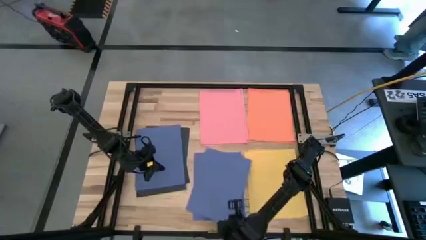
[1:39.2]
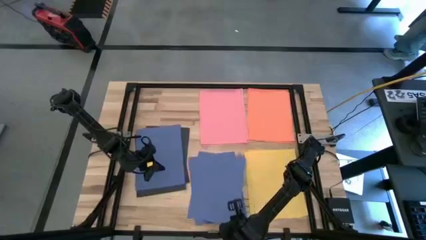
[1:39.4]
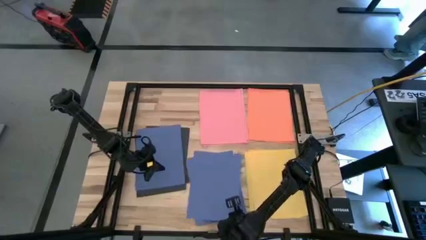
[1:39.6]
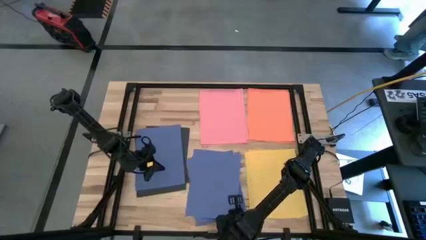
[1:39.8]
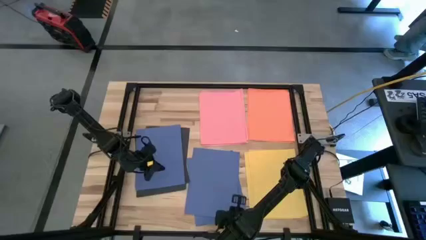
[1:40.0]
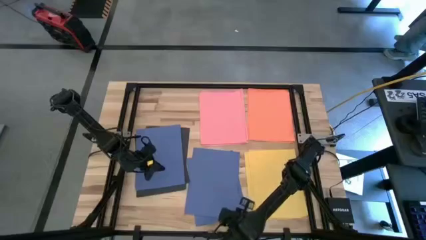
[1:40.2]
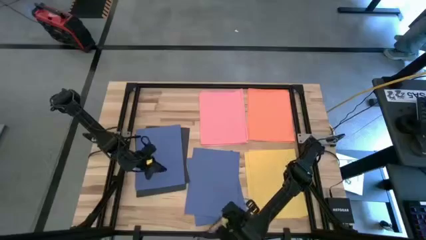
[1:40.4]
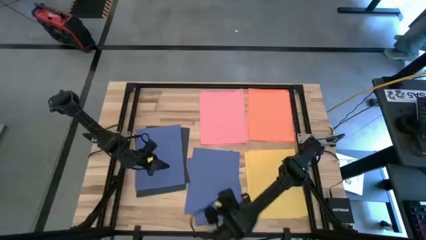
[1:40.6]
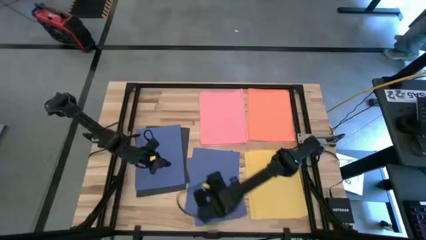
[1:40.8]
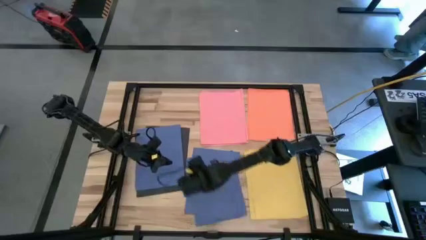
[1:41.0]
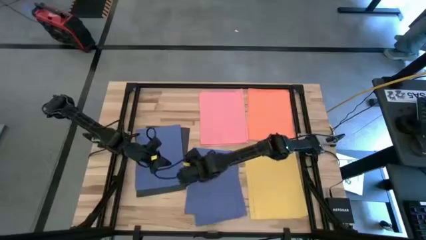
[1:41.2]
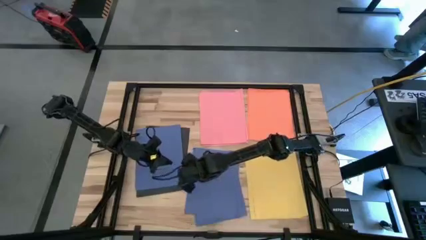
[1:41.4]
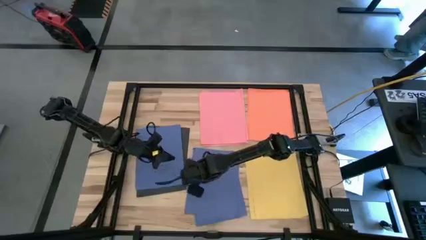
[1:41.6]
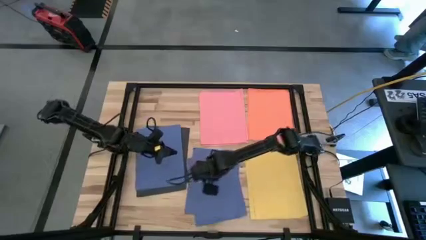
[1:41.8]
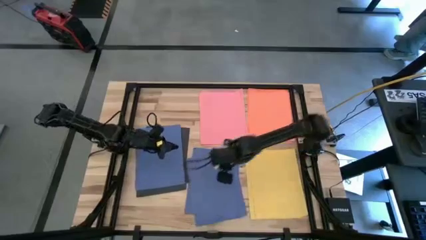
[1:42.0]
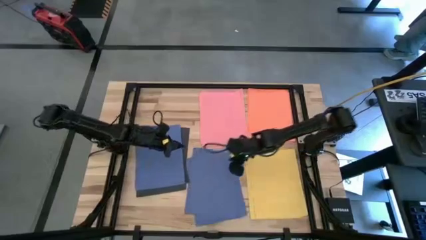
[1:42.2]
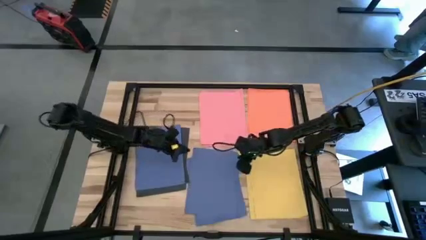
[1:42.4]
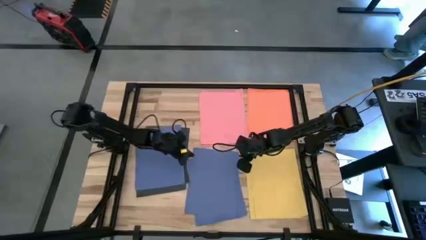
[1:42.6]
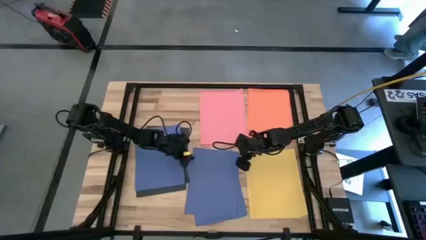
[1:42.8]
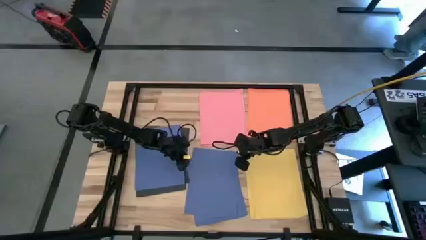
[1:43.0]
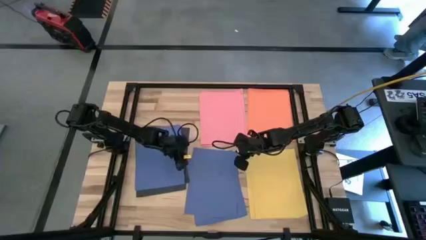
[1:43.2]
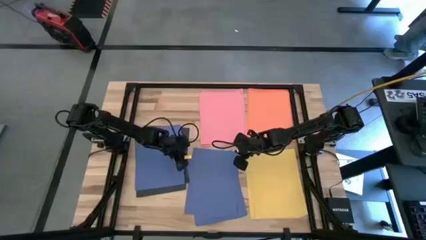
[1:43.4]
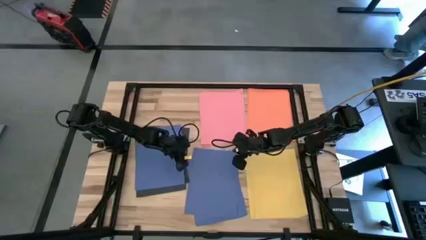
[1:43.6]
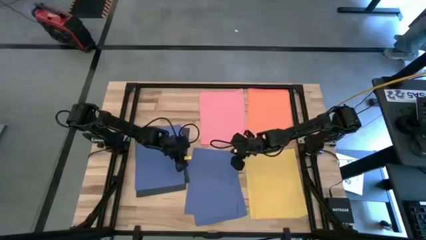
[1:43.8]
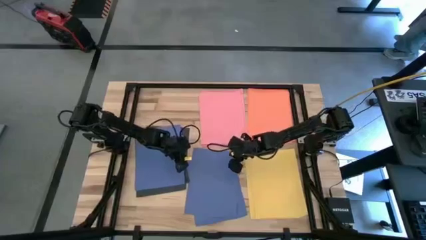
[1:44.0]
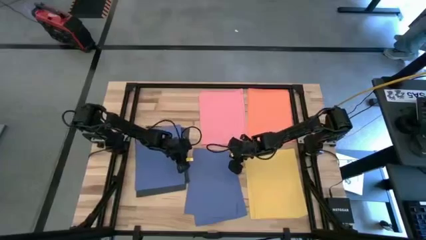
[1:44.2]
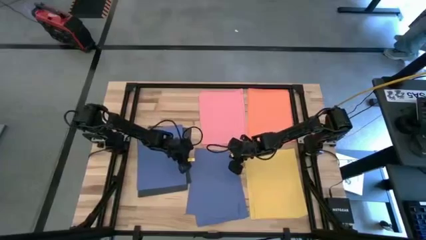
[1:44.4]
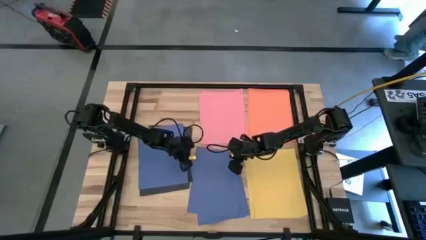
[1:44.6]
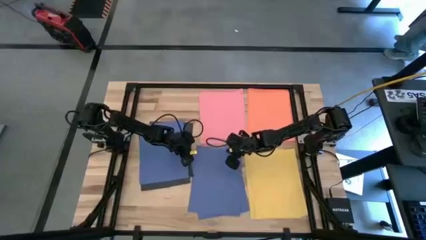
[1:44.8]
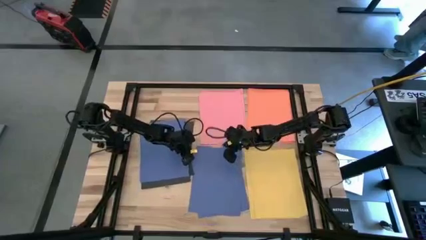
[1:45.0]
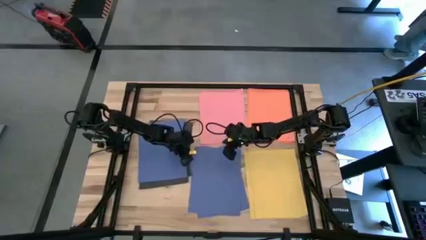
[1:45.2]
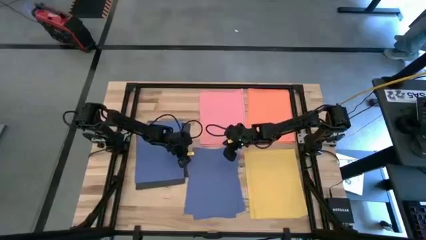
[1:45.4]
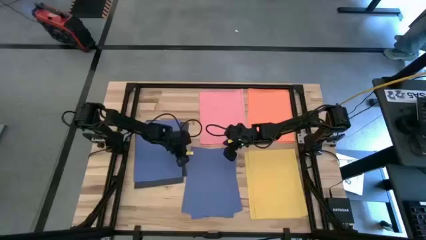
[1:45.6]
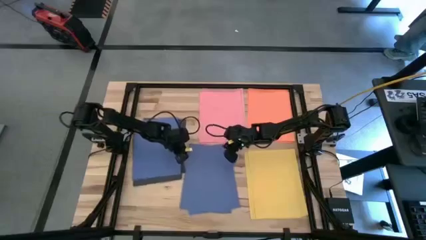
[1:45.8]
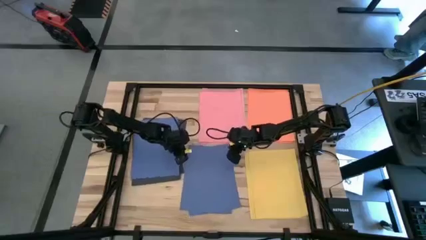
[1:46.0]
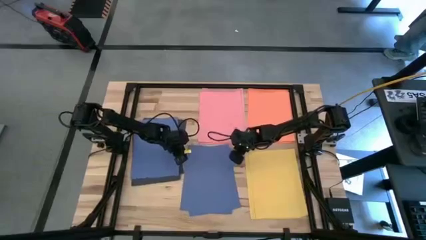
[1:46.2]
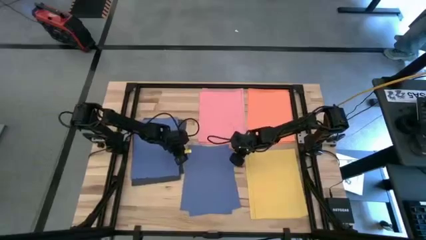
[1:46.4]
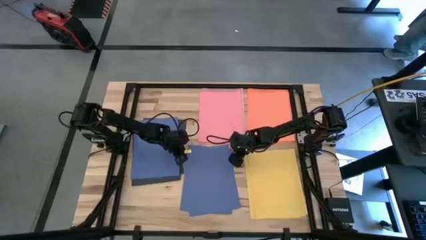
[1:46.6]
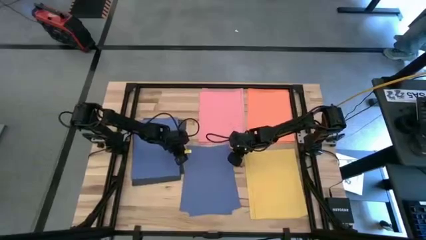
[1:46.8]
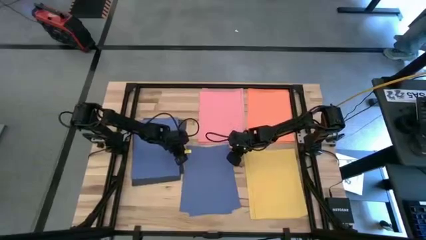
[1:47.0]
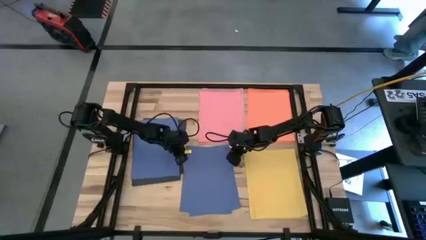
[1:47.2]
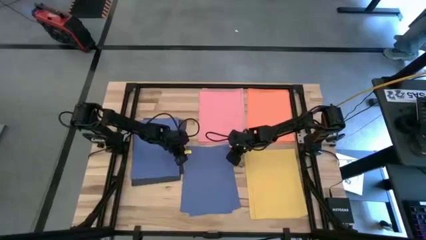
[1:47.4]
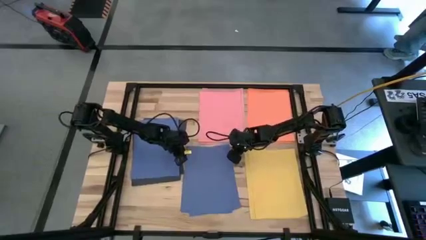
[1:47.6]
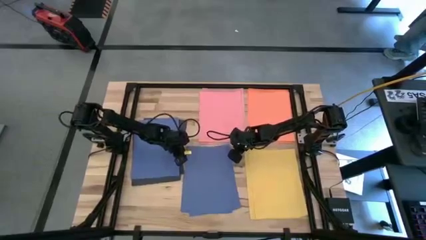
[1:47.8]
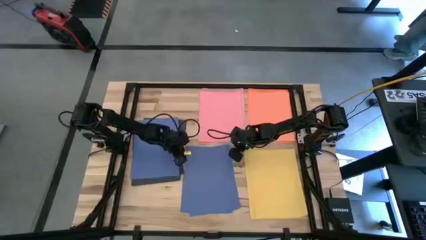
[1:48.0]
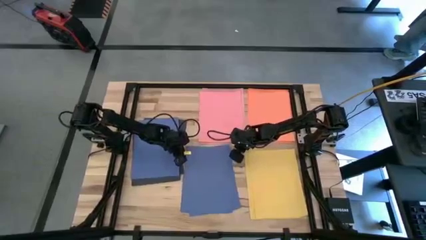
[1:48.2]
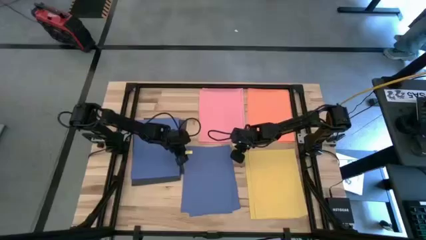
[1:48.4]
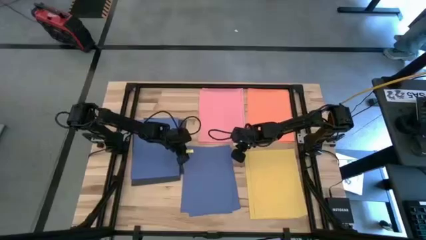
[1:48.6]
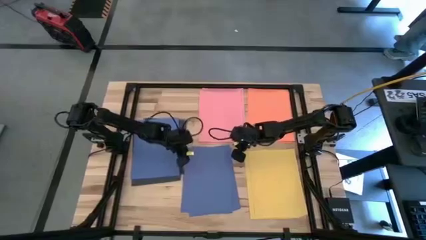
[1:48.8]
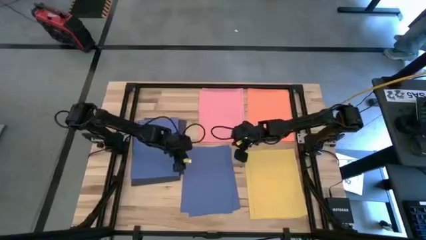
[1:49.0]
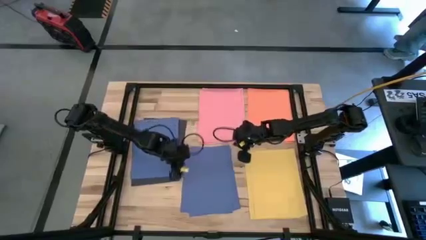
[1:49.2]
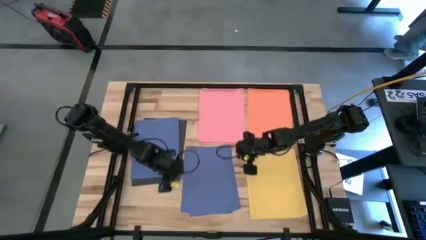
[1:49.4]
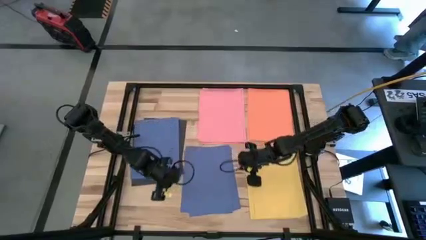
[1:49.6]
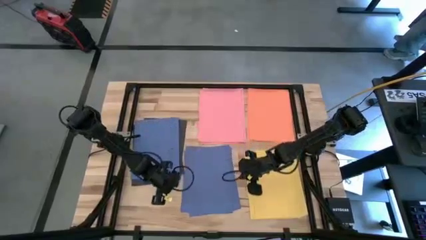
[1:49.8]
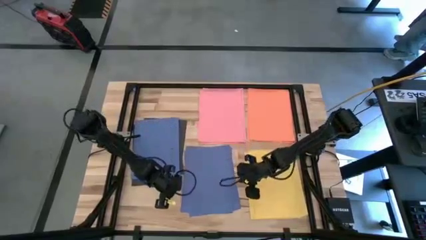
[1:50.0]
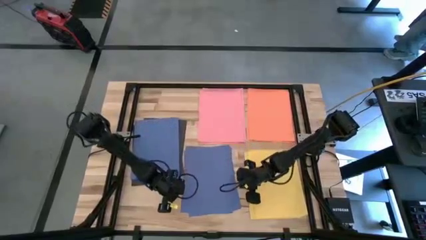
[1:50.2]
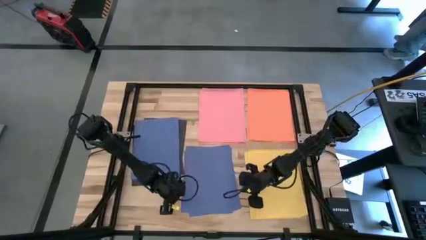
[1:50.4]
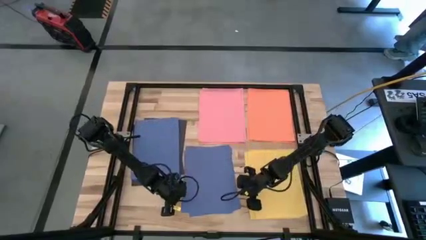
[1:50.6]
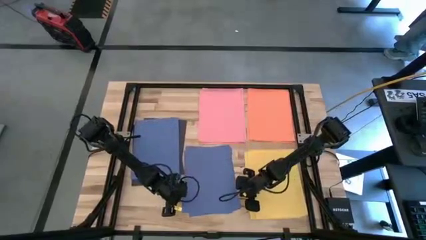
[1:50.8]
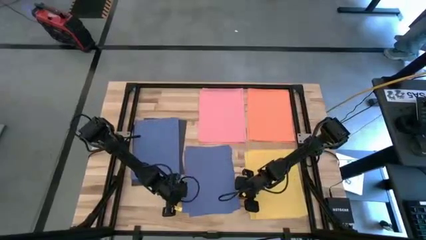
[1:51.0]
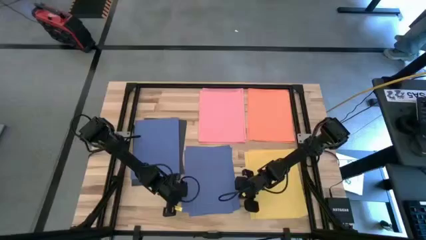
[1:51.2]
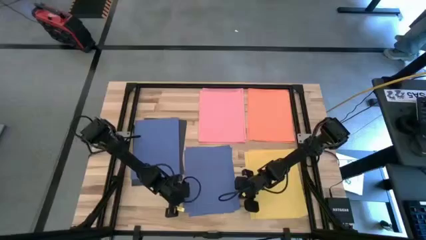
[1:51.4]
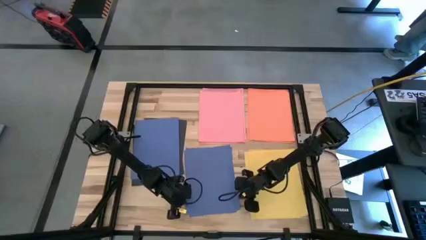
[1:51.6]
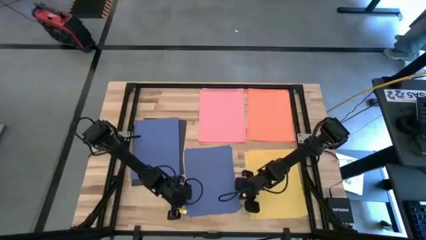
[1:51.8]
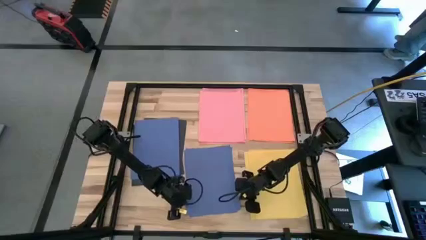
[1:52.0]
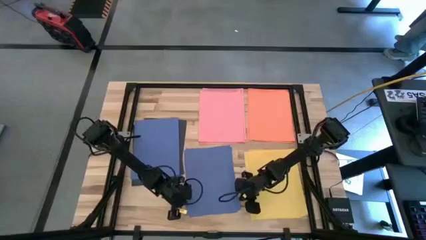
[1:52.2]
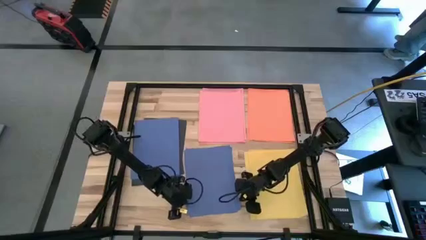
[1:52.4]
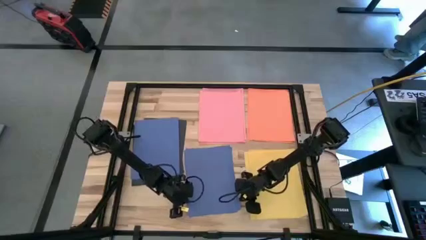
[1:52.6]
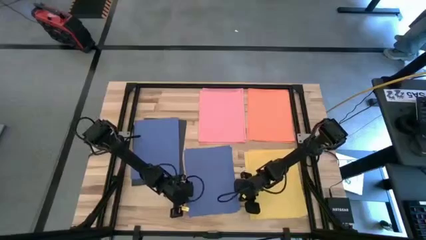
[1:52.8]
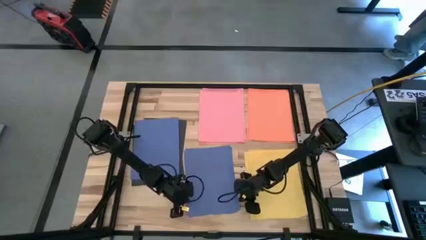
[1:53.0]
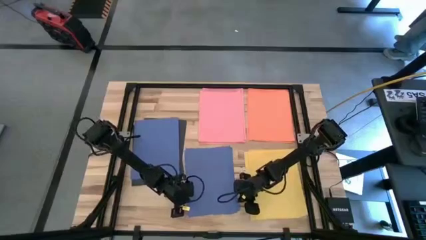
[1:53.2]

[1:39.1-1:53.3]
Task: Organize paper
Put all of the blue paper at the lower center of the table

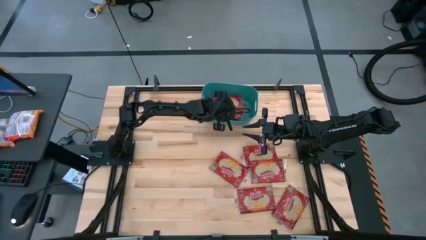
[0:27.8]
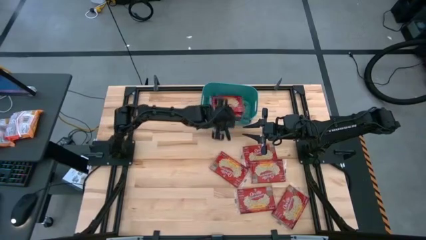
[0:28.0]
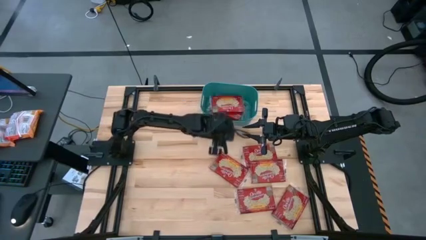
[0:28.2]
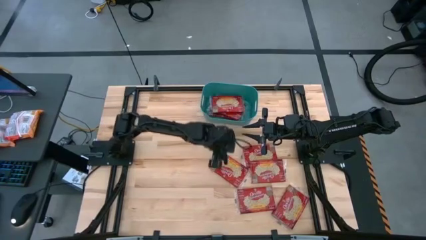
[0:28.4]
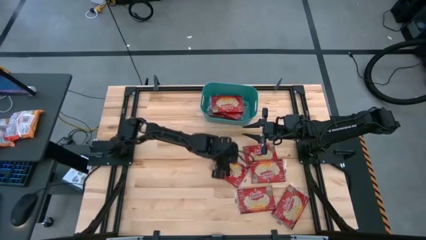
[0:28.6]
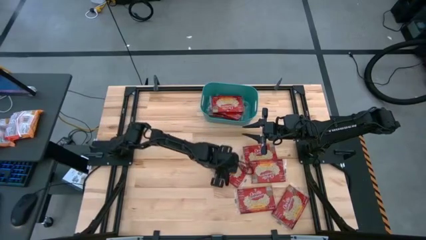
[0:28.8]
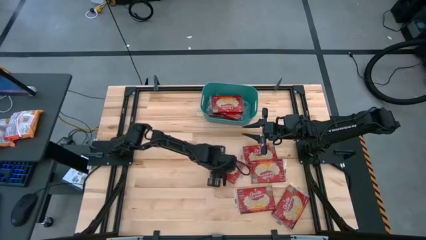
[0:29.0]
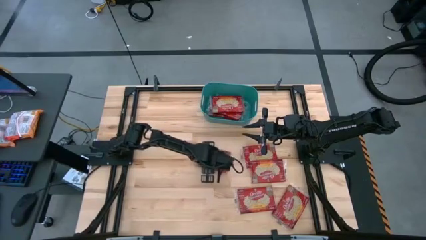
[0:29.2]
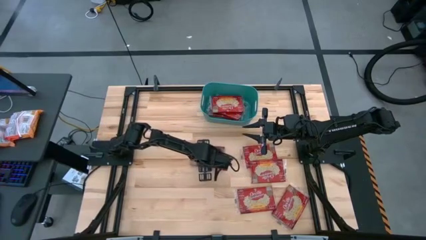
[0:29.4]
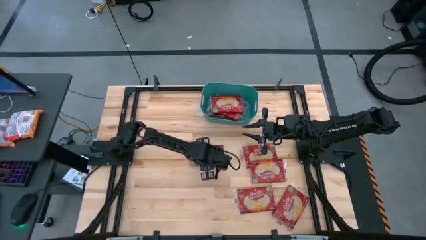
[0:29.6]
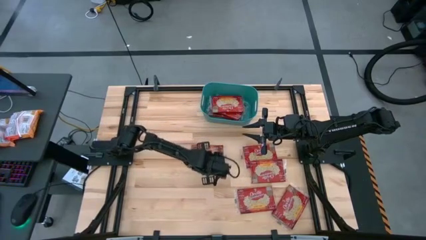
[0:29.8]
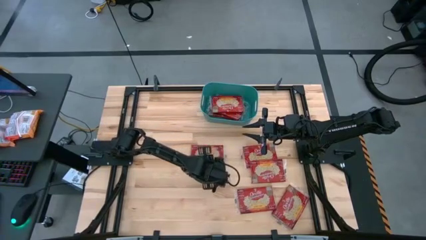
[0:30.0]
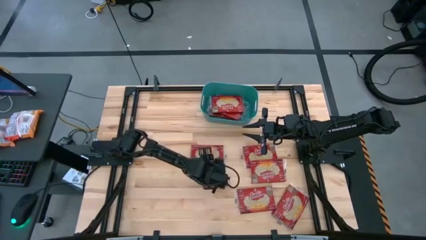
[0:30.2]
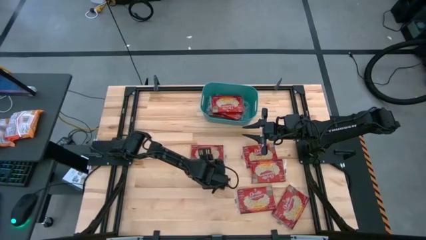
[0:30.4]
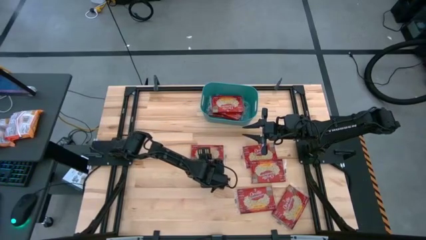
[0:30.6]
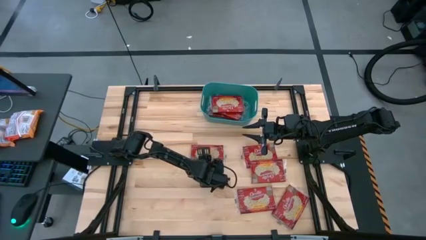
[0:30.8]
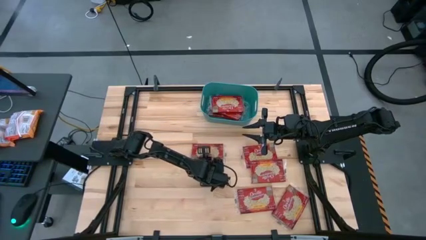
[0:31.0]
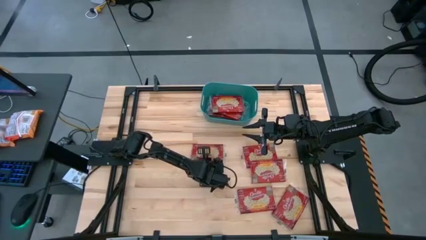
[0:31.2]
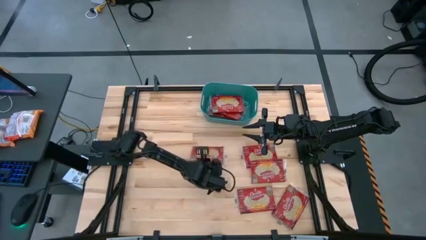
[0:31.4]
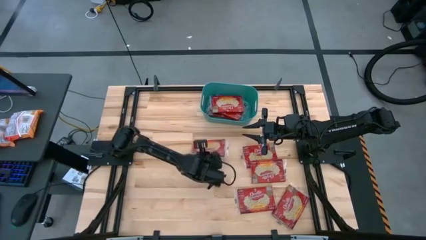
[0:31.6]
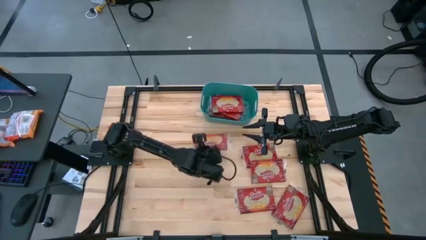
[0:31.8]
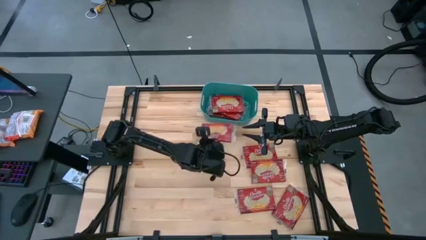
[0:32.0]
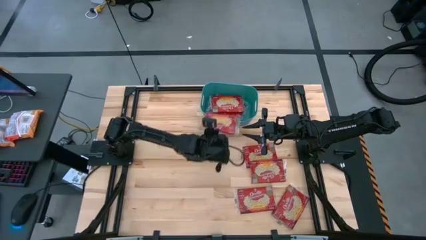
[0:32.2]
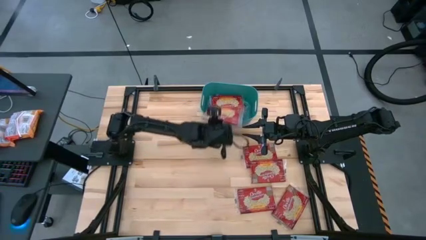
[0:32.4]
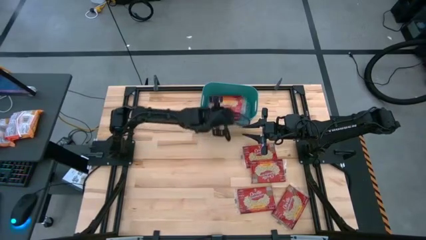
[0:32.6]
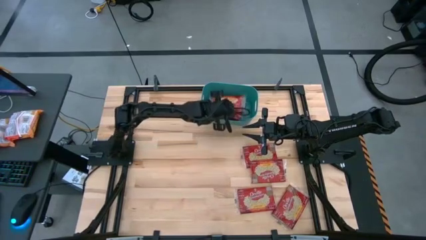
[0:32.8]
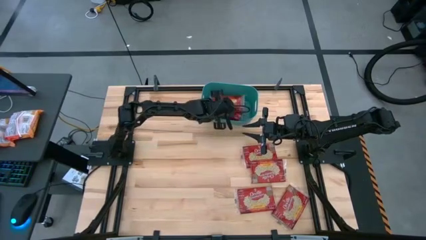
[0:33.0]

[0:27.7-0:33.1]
Task: Sort popcorn bags into baskets
Put the red popcorn bag into the blue bin
